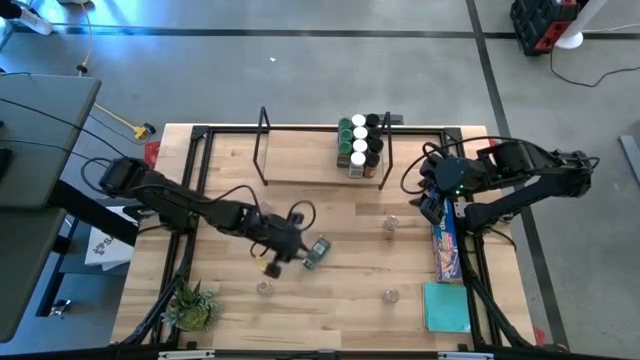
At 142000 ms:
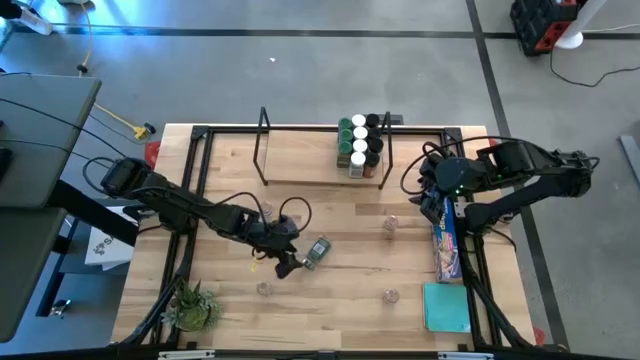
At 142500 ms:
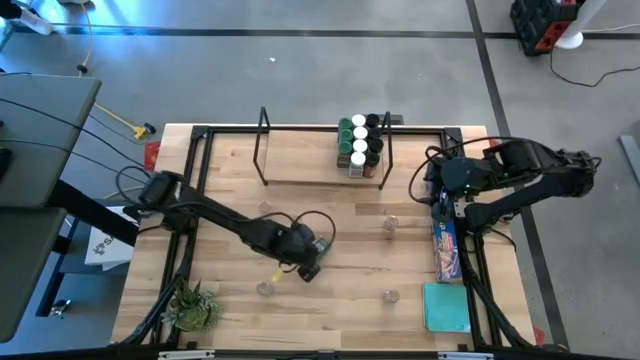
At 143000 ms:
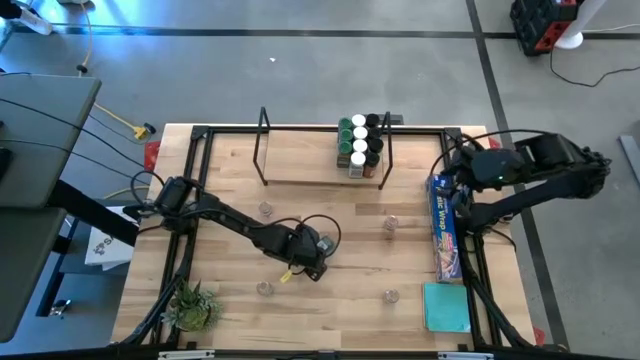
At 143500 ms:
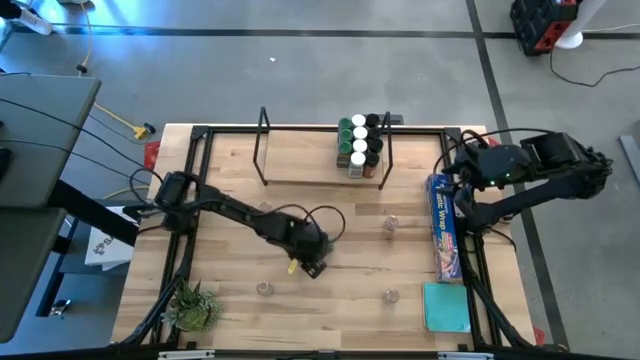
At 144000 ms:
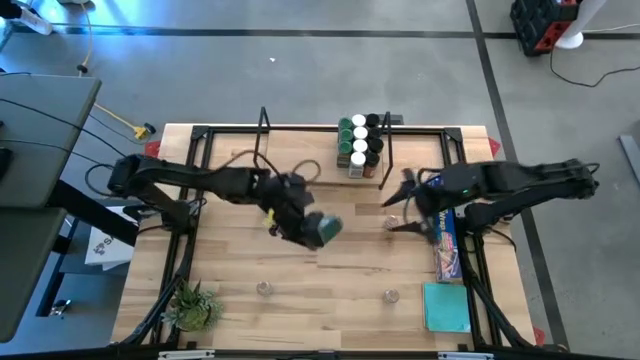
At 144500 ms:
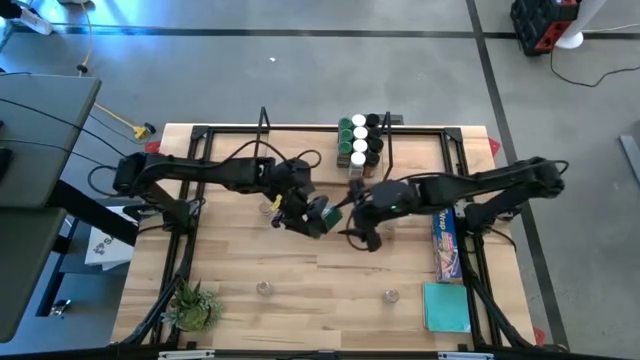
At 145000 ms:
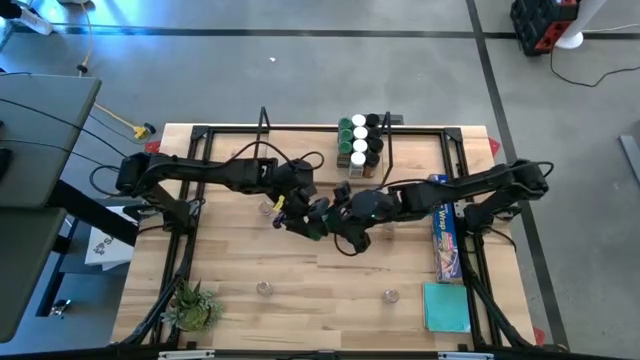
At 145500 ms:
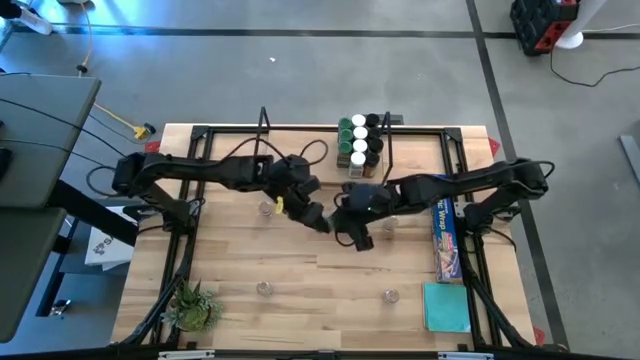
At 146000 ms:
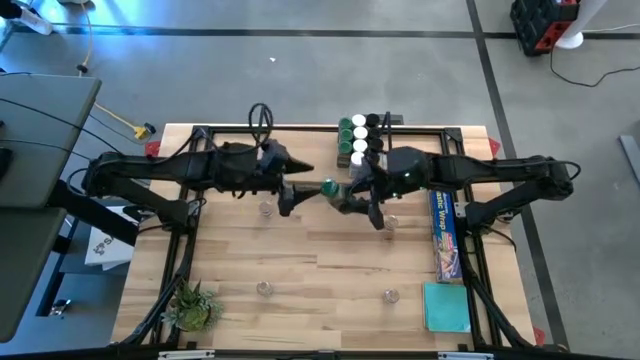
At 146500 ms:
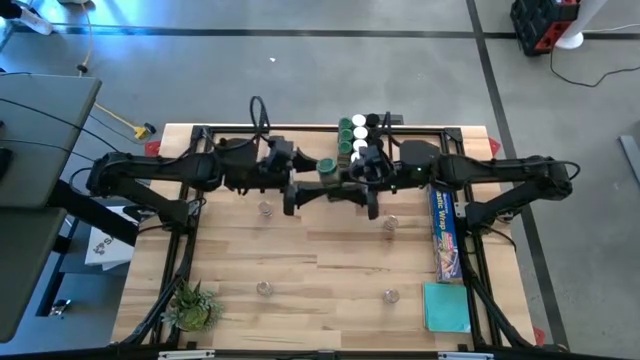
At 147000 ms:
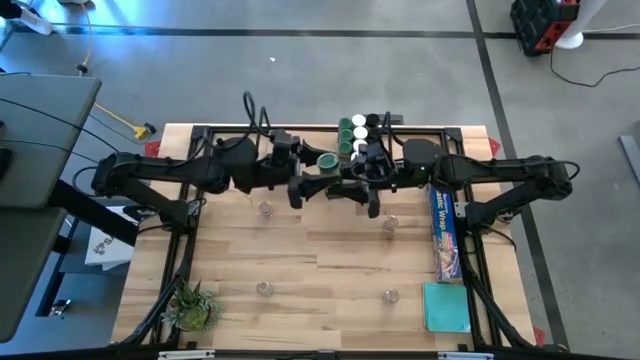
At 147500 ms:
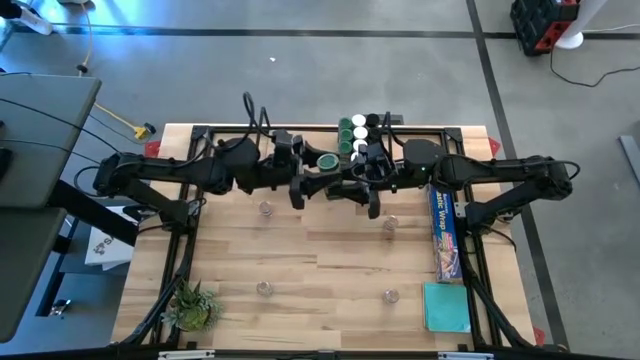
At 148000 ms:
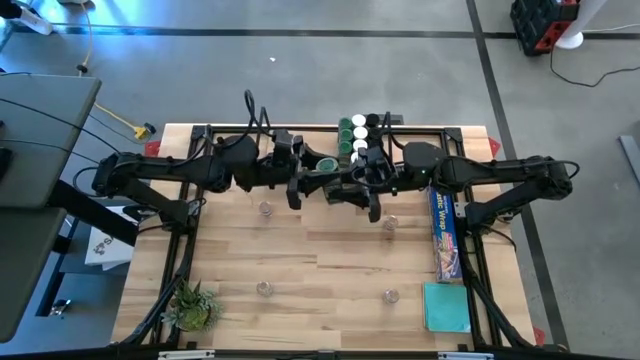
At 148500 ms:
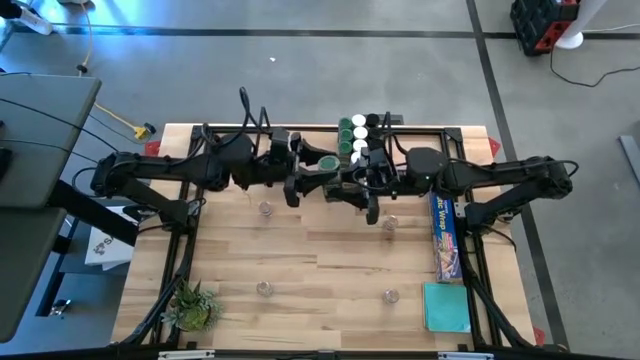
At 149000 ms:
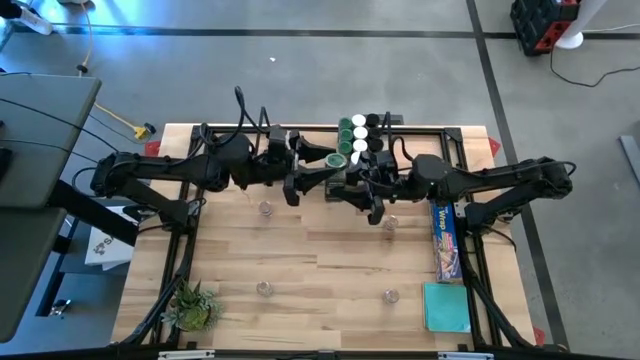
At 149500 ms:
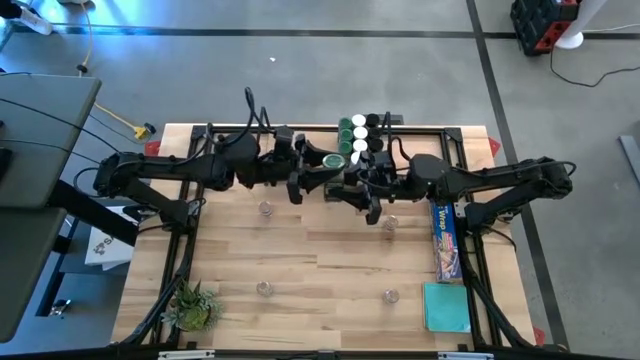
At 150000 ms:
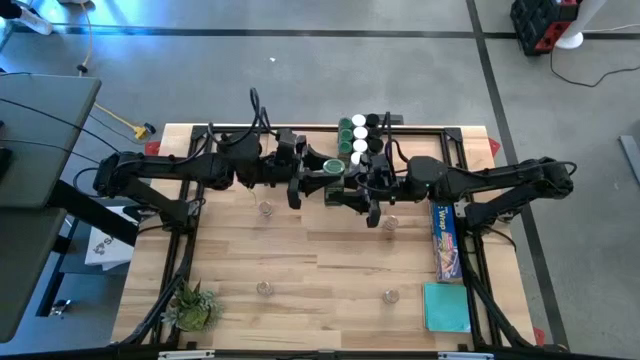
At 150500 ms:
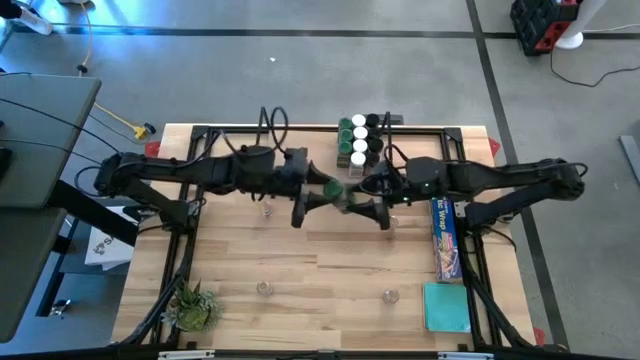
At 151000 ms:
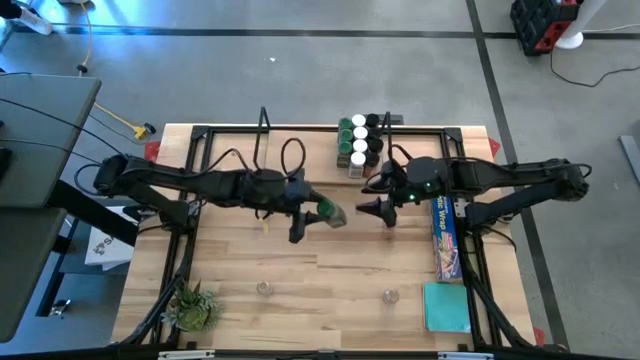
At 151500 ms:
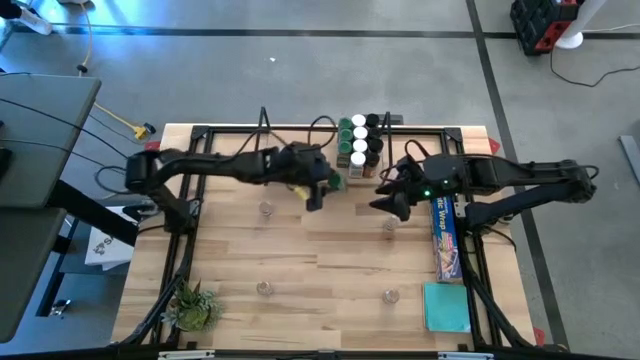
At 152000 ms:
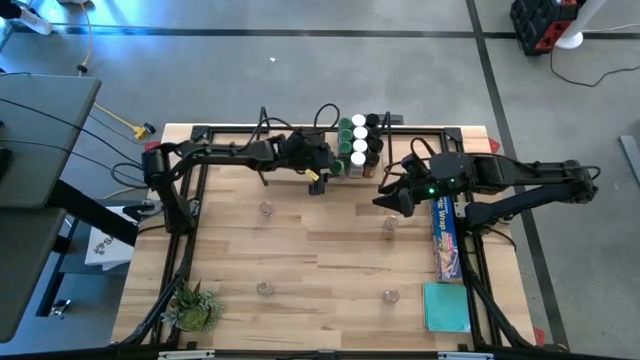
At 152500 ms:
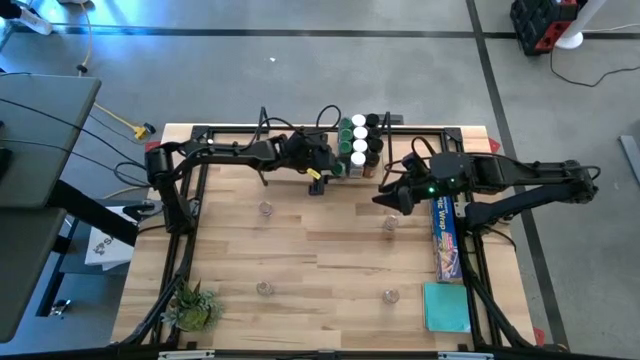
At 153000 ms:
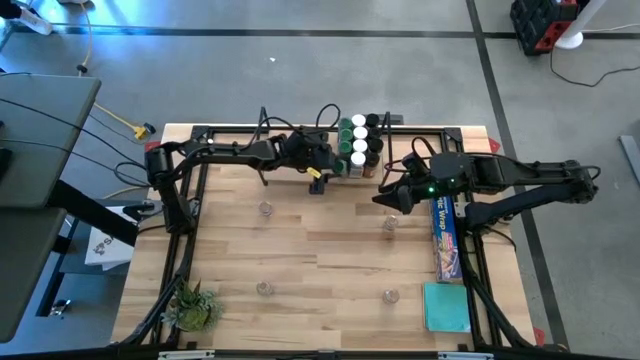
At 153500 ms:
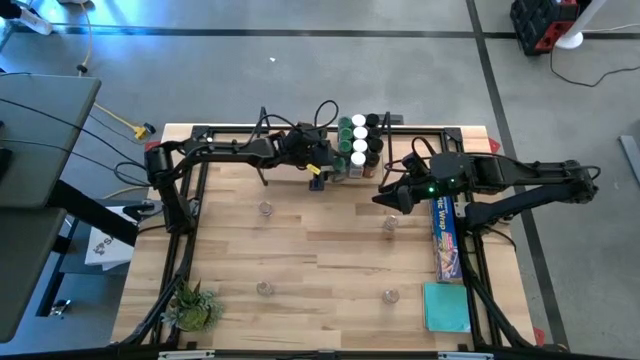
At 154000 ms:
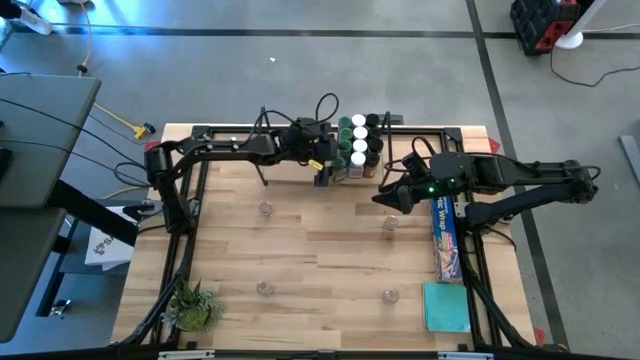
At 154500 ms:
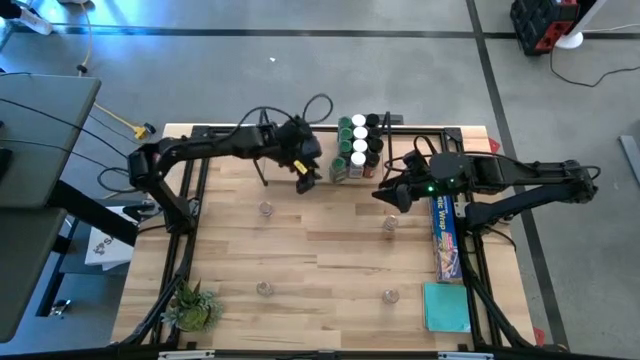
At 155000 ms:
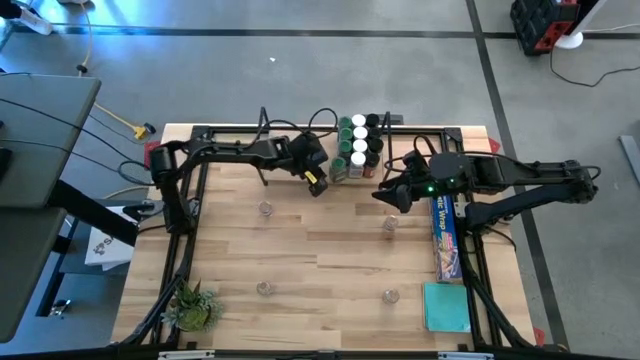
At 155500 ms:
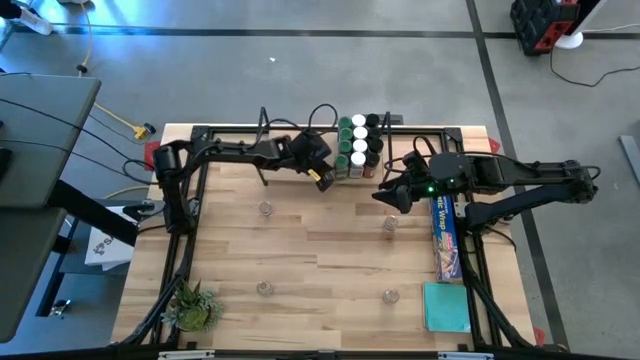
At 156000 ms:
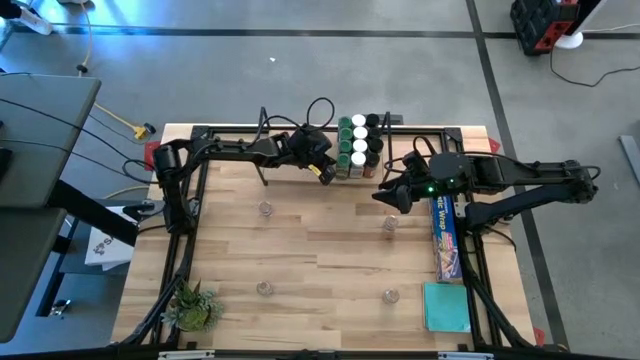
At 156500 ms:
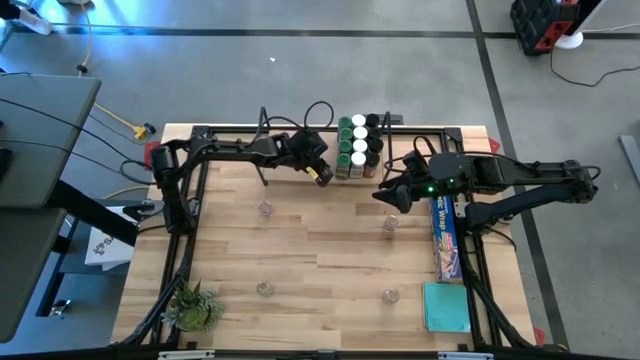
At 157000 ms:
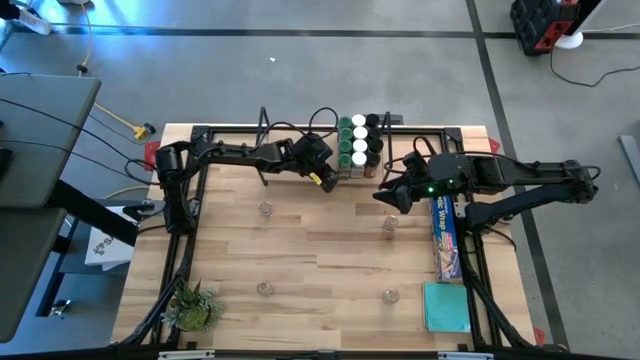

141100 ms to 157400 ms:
Task: Shelf spices
Put the green seasoning bottle on the shelf aligned with the other green seasoning bottles

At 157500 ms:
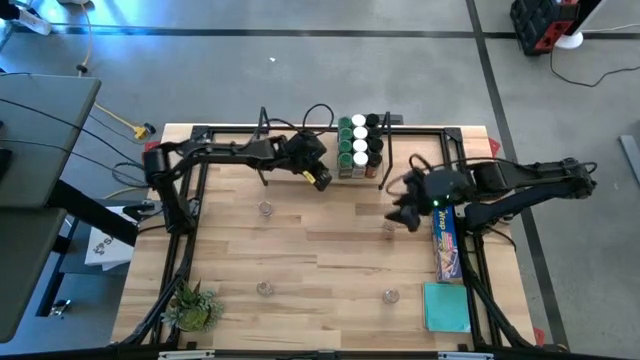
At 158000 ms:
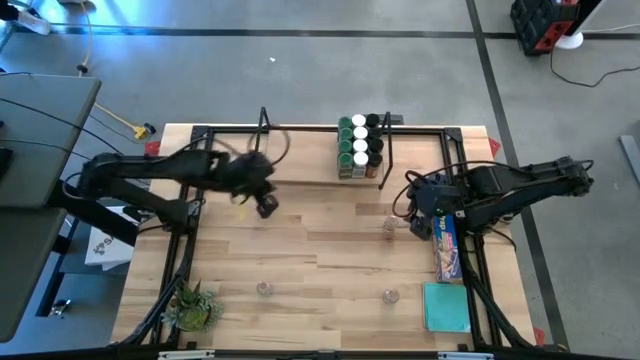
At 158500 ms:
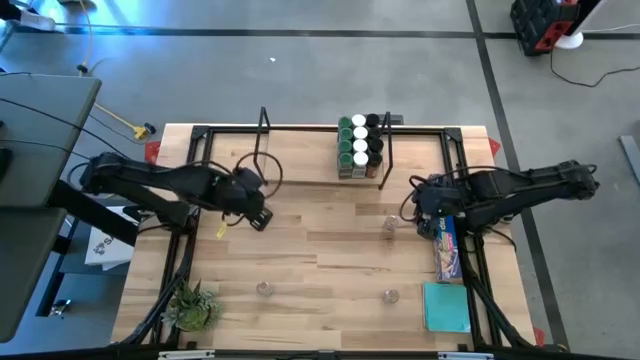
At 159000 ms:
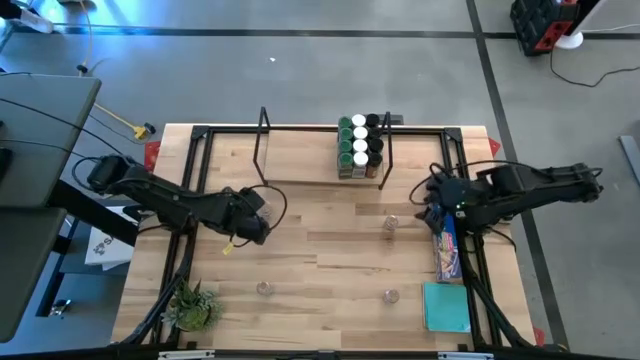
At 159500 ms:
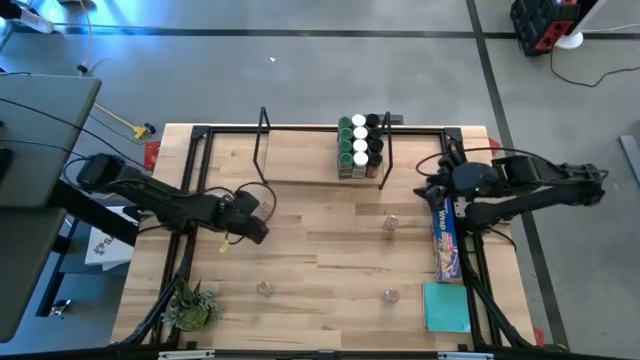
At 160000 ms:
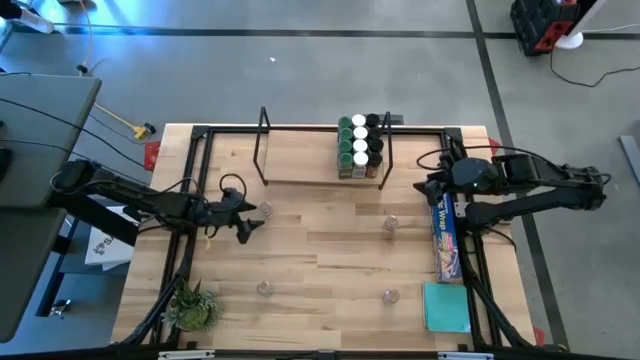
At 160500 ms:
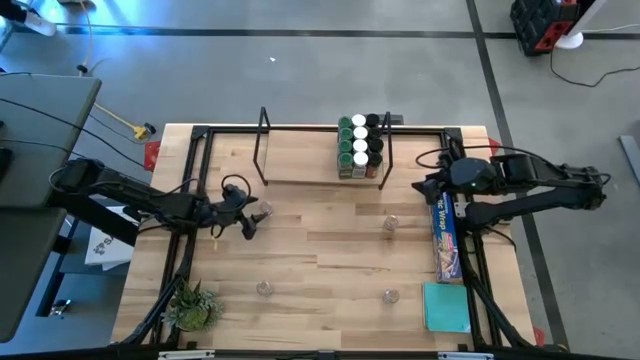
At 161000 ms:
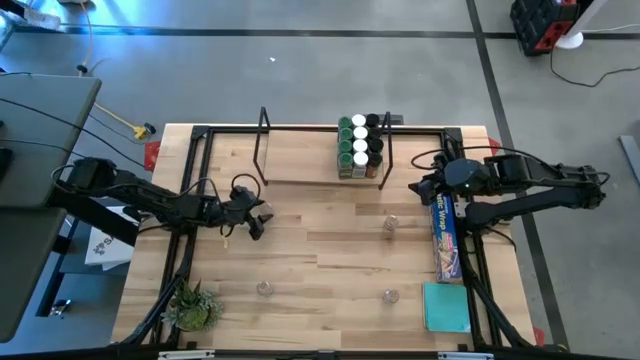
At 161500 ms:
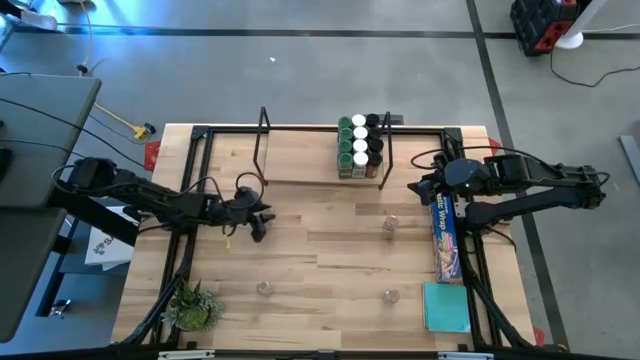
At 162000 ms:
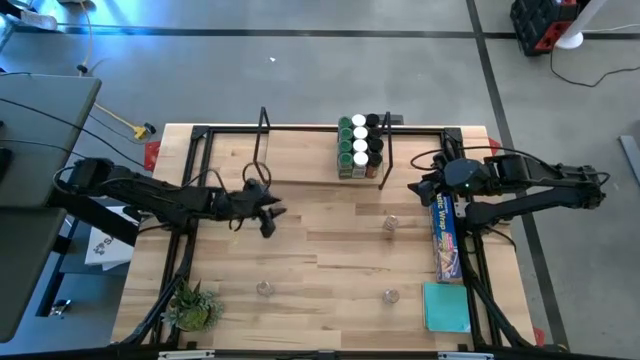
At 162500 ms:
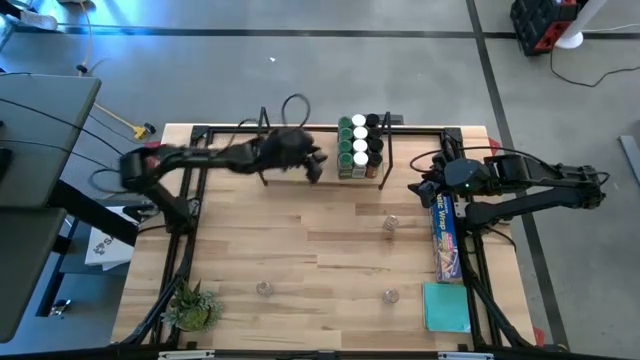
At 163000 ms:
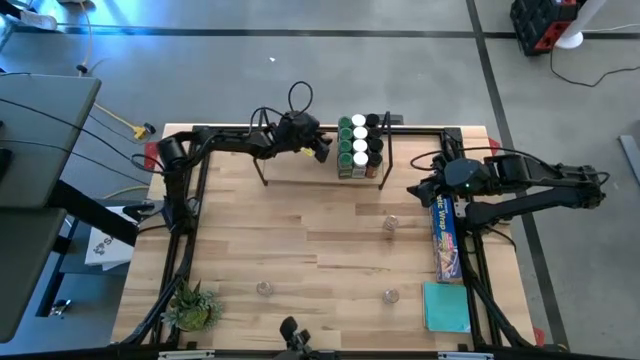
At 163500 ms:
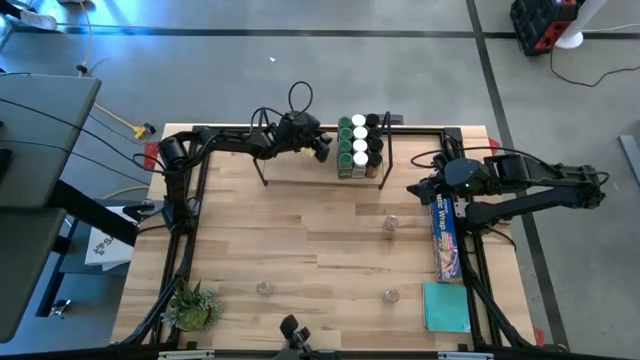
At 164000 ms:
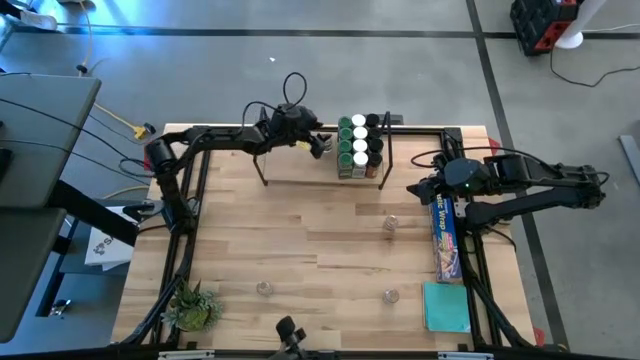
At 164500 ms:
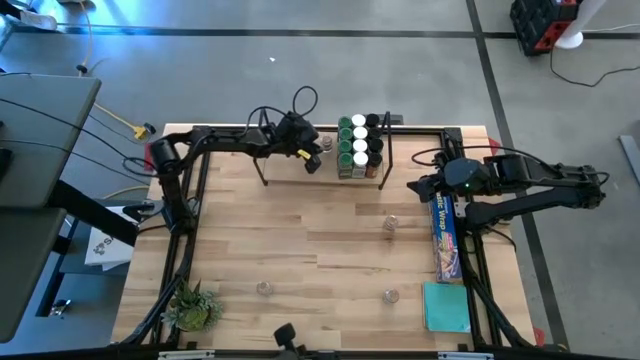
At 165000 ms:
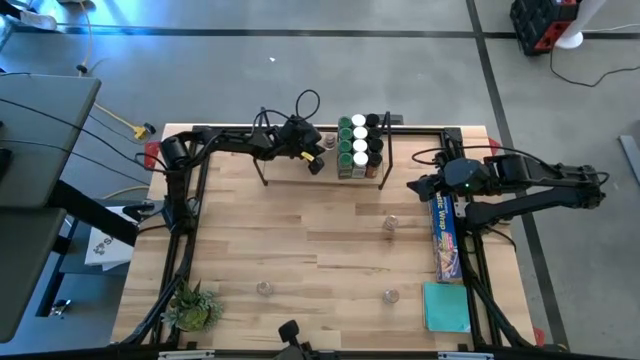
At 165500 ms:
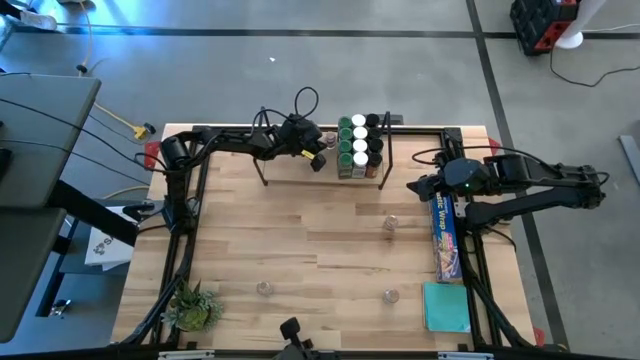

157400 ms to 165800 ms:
Put the brown seasoning bottle on the shelf
